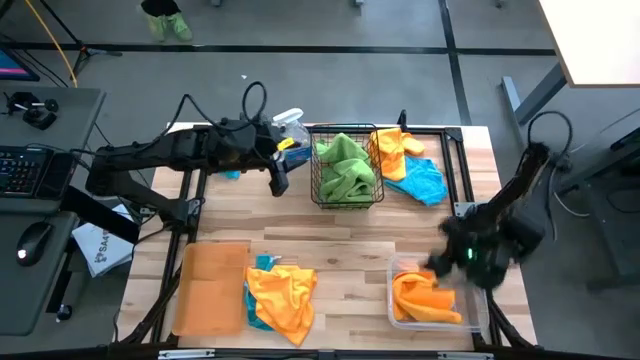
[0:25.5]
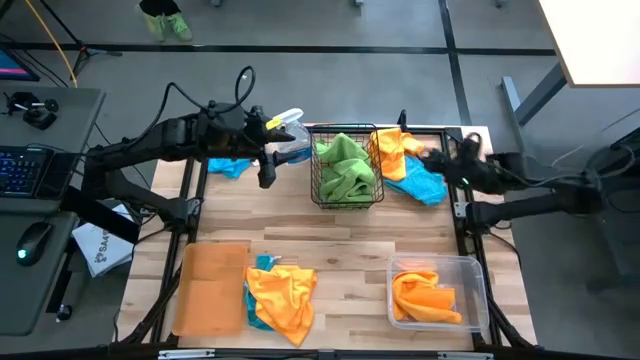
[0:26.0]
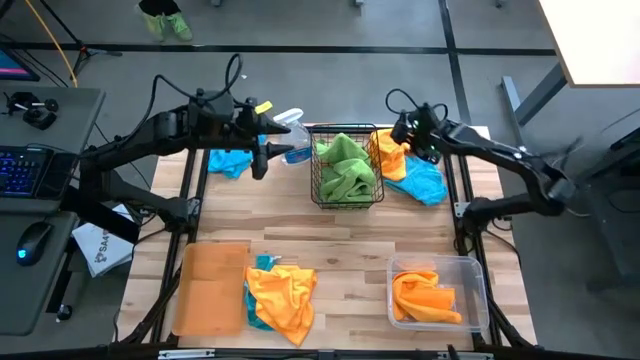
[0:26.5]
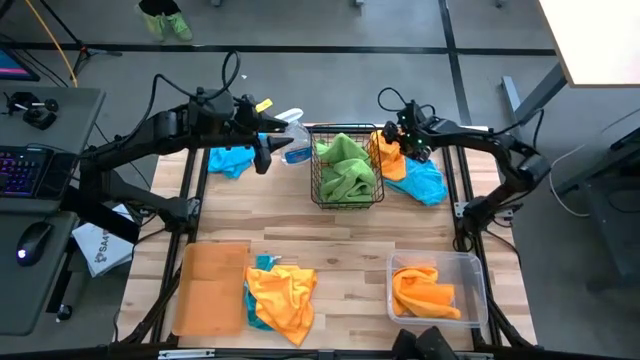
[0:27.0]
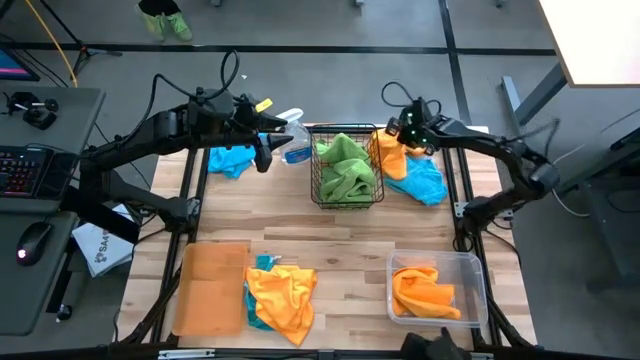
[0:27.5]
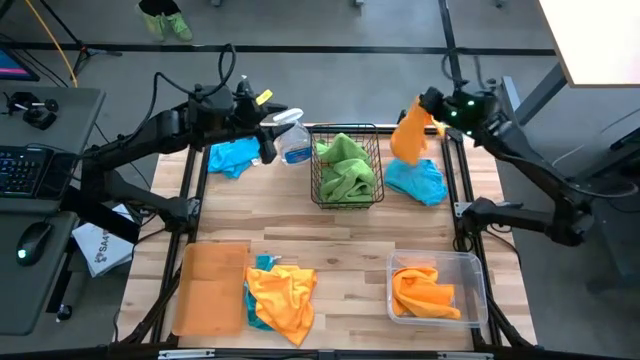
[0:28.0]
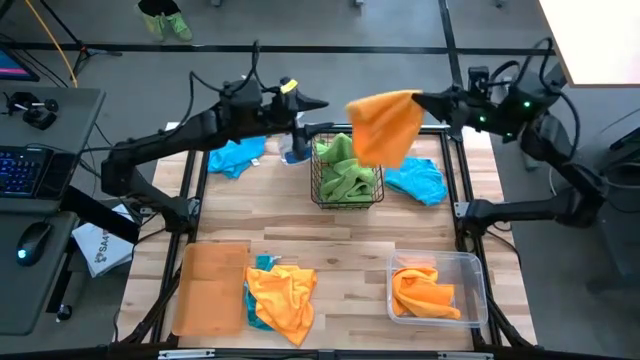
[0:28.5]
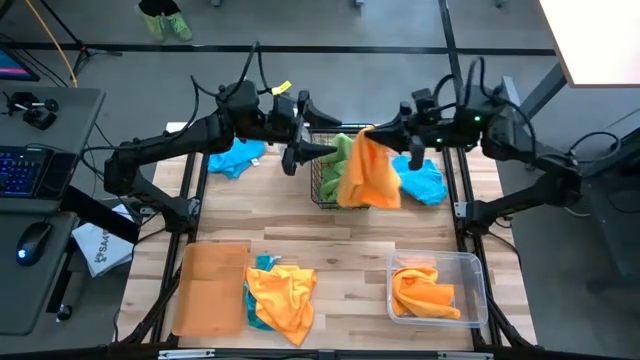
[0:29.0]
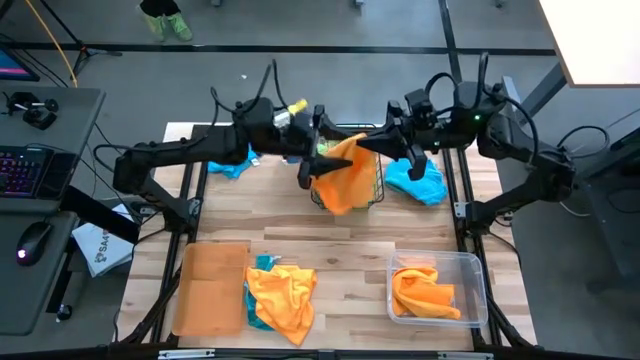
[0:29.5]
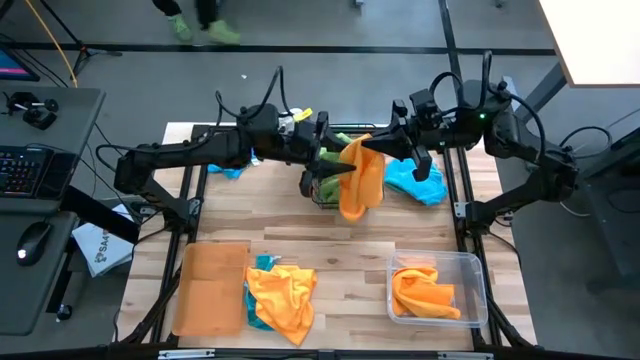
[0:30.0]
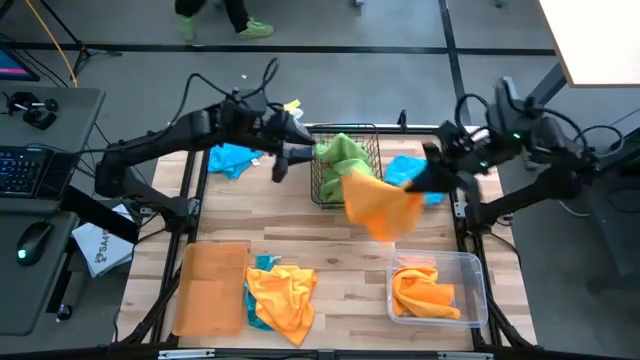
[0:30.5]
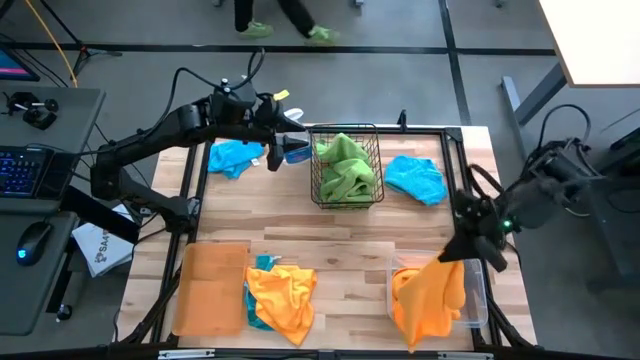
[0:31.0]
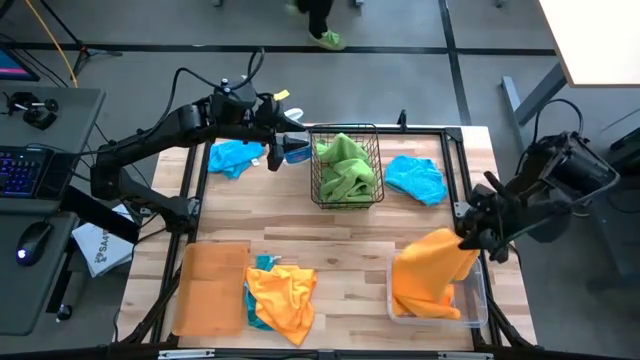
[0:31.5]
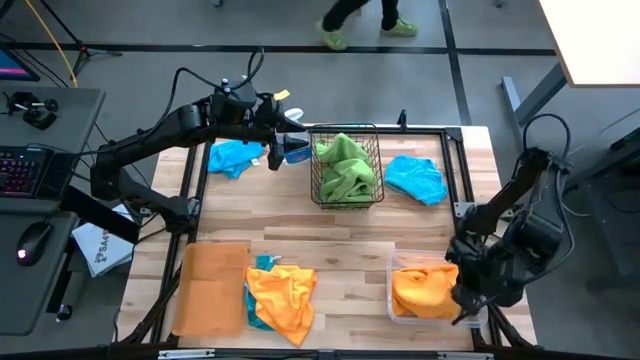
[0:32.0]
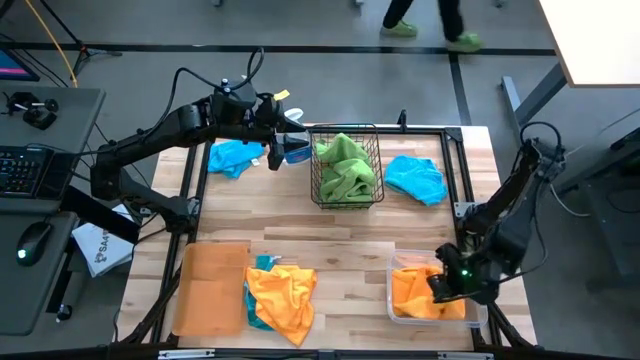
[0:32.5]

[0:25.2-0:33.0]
Task: Sort microfiber towel by color & place in baskets
Put the top yellow towel into the transparent bin

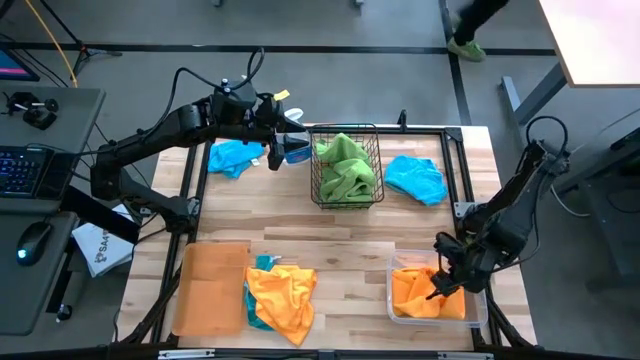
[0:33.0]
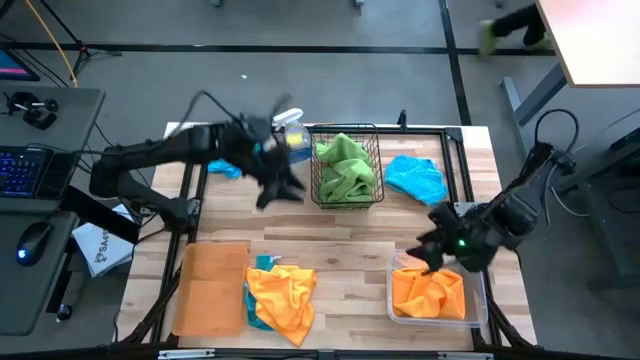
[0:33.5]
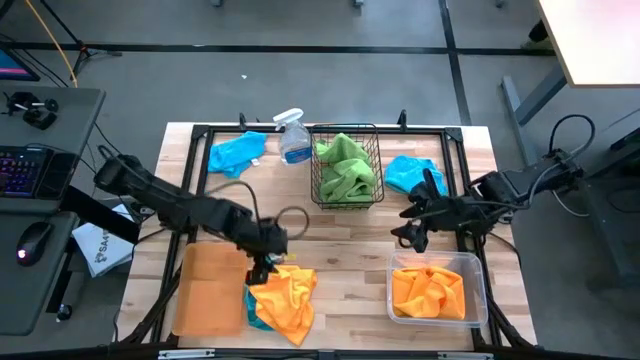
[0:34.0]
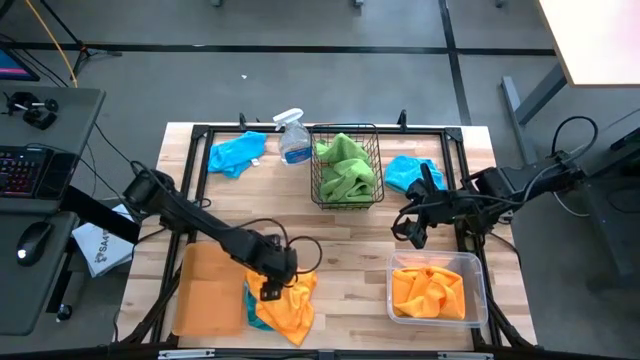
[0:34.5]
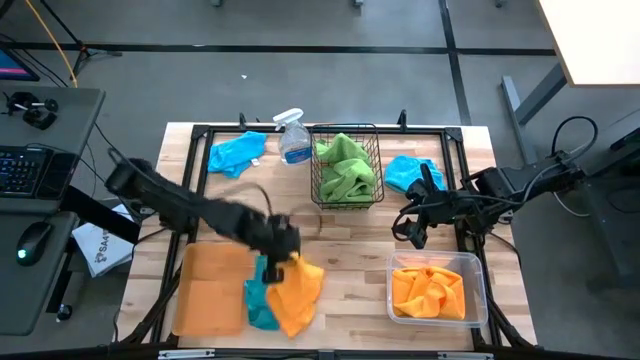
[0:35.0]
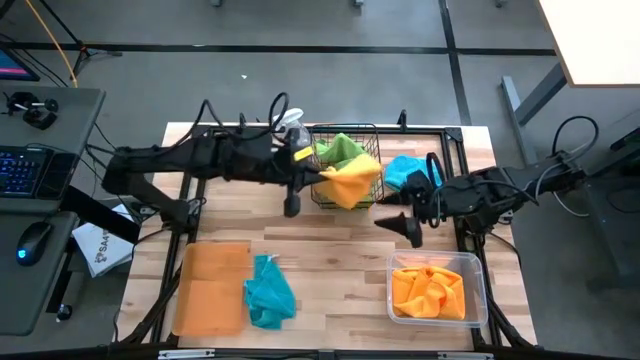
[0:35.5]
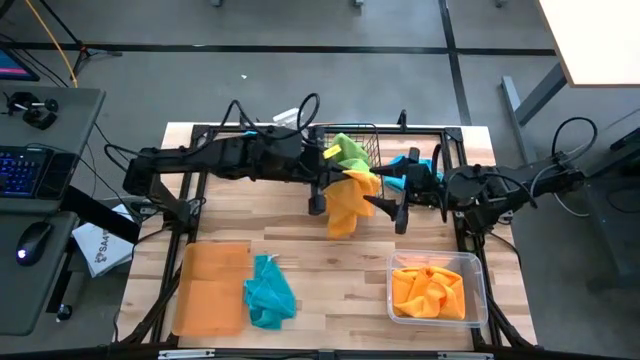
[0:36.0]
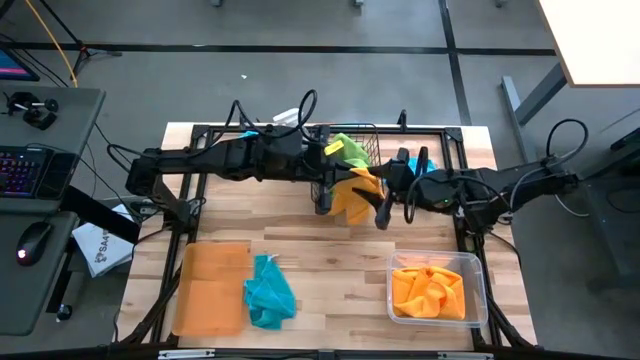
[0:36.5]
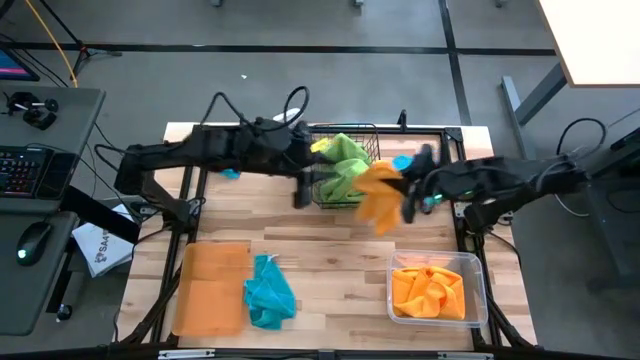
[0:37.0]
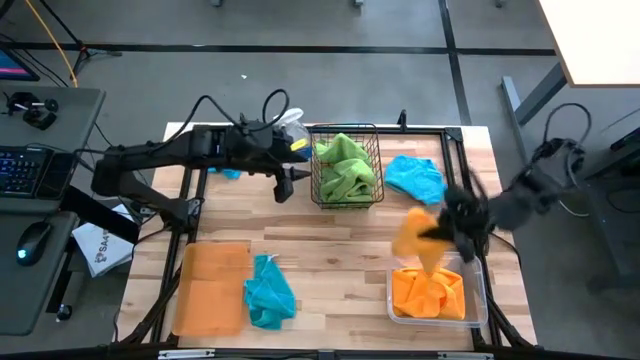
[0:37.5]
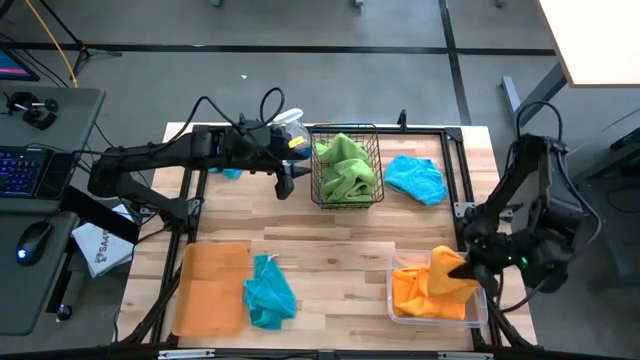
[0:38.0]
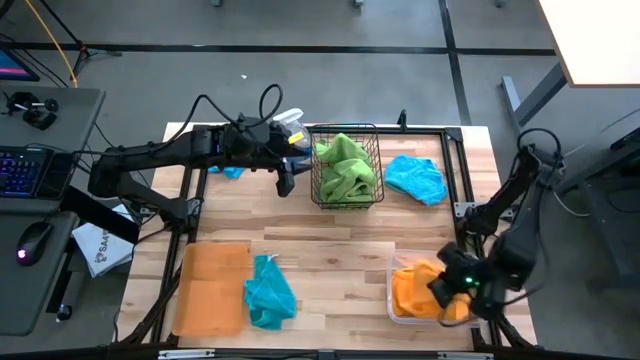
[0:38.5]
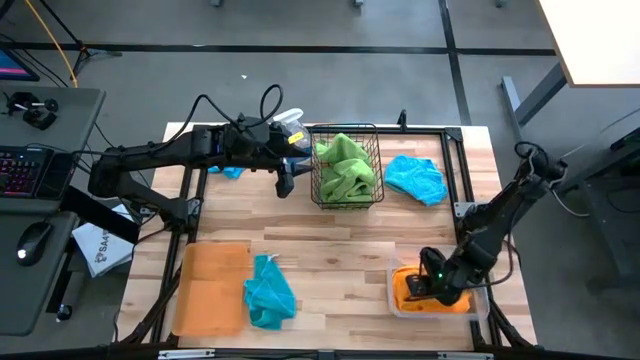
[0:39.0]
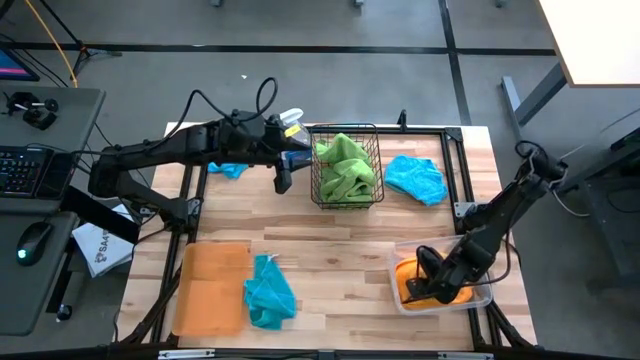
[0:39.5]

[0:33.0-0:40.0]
Put the yellow towel into the transparent bin

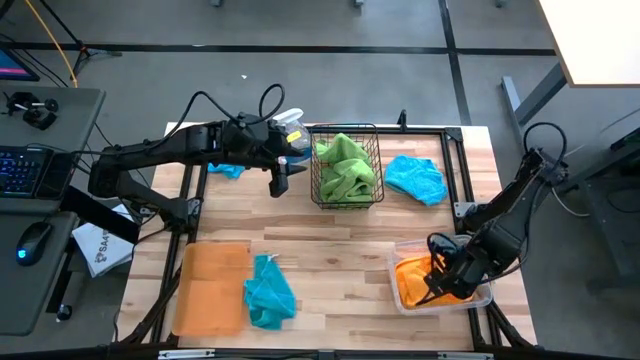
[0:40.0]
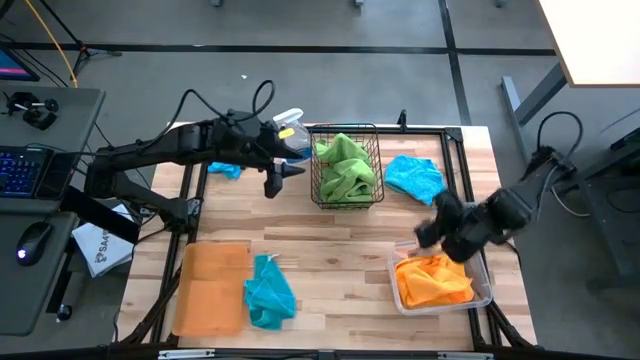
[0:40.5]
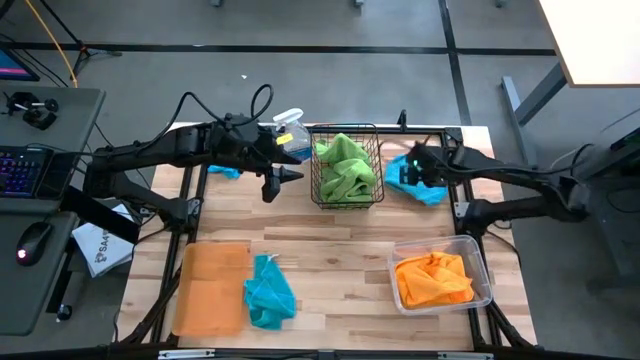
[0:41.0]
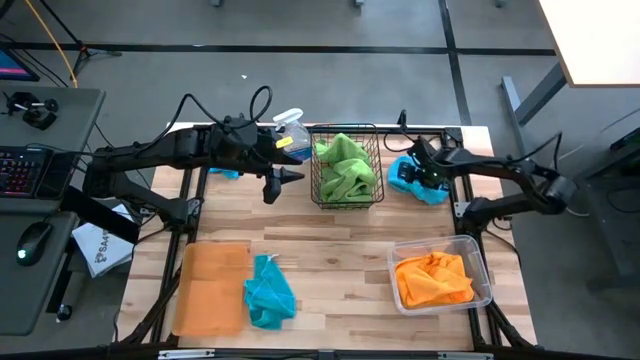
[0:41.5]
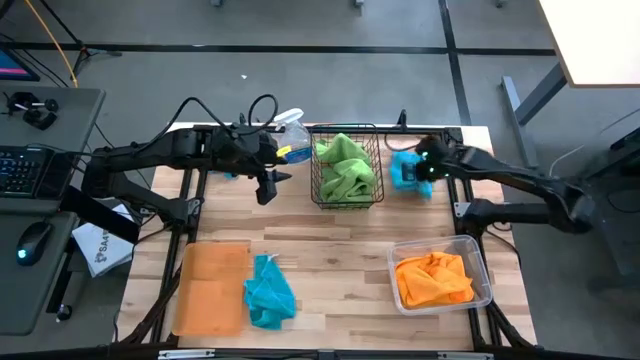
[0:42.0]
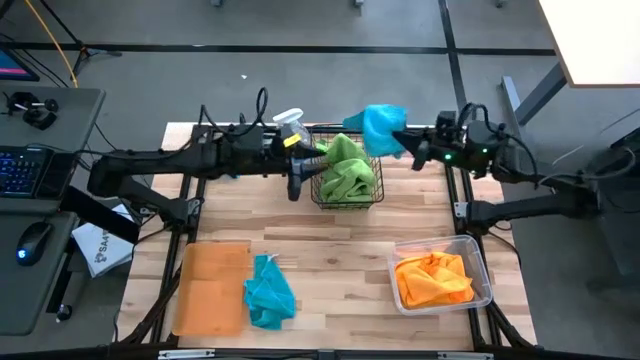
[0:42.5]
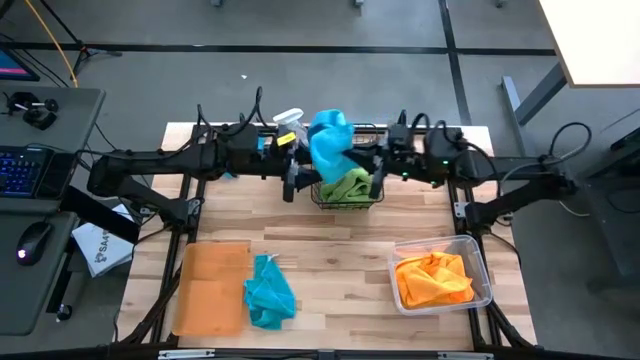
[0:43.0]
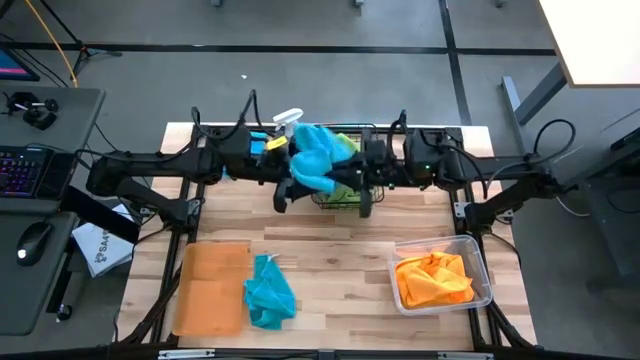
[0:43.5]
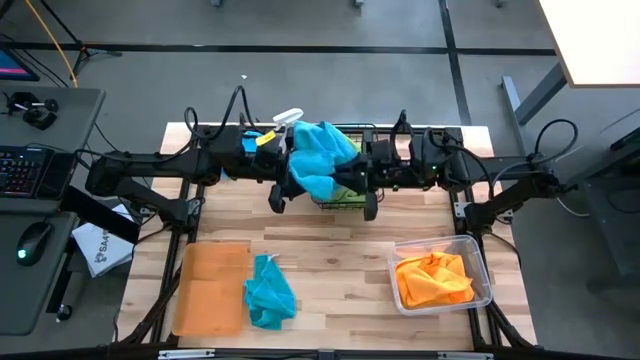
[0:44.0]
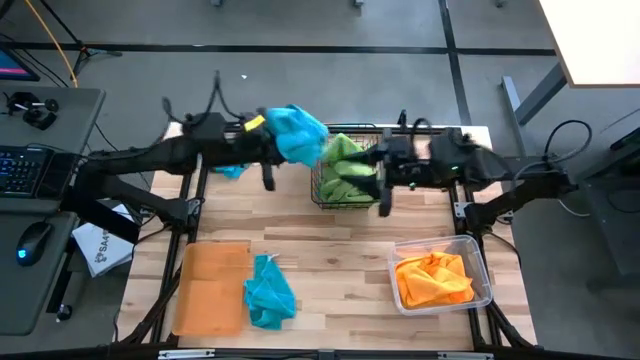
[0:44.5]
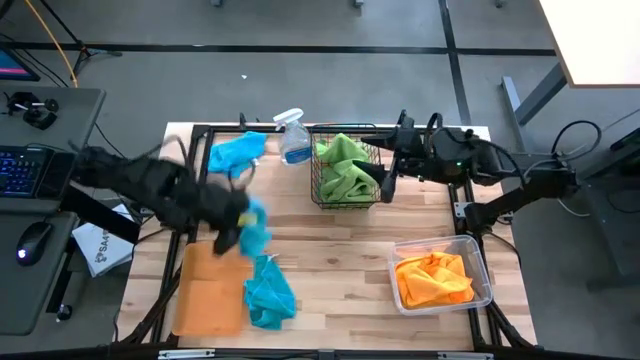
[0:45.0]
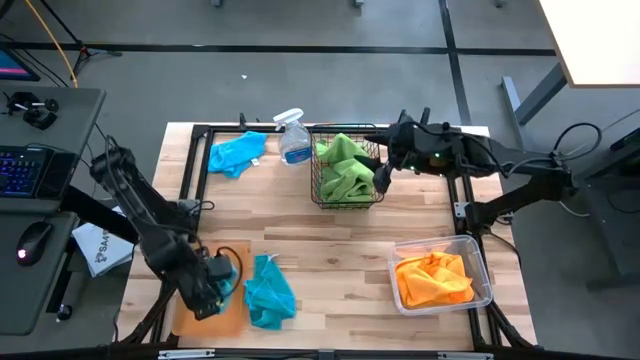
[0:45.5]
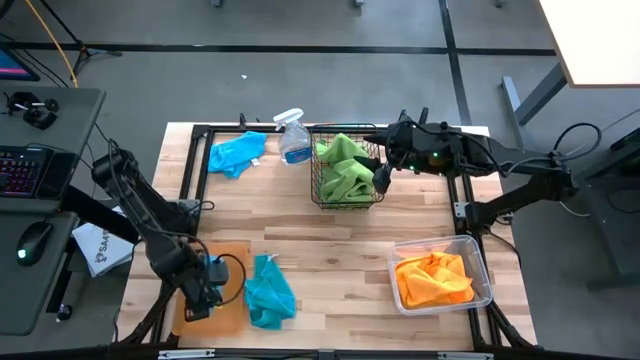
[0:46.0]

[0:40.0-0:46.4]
Put the top right blue towel into the orange bin
